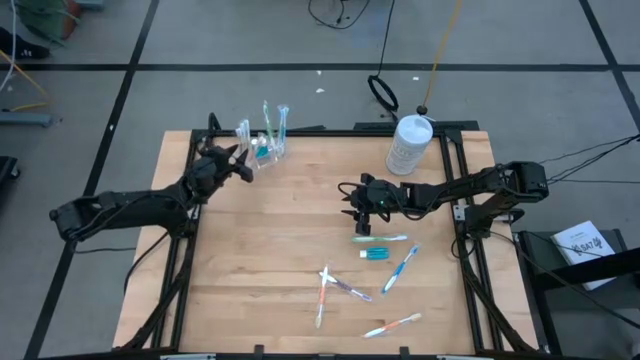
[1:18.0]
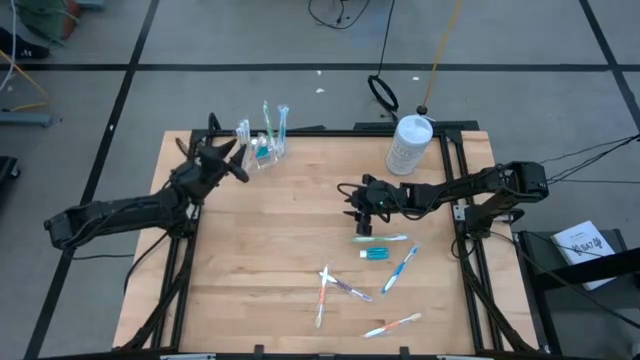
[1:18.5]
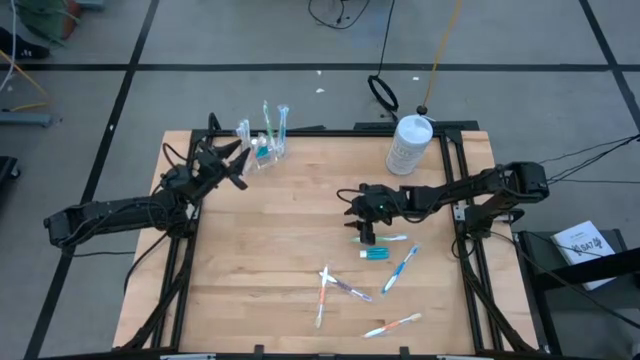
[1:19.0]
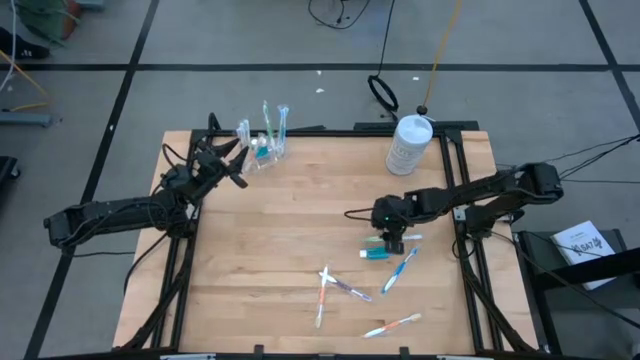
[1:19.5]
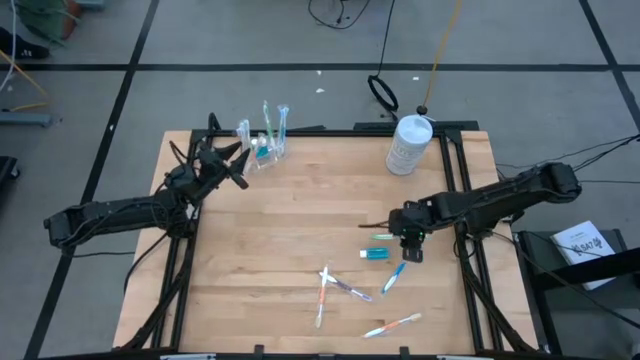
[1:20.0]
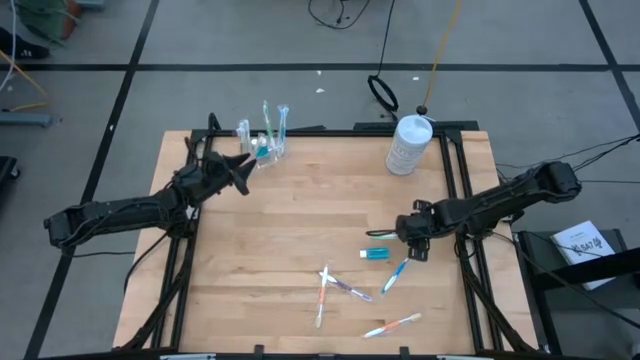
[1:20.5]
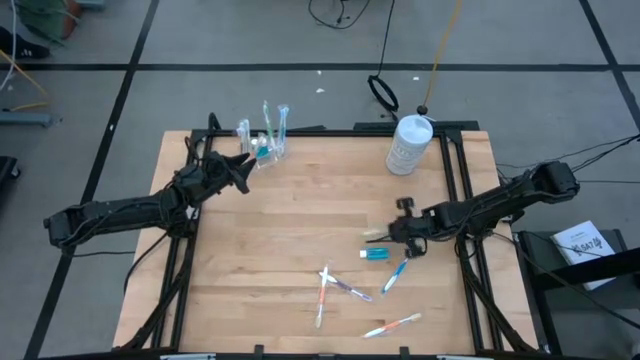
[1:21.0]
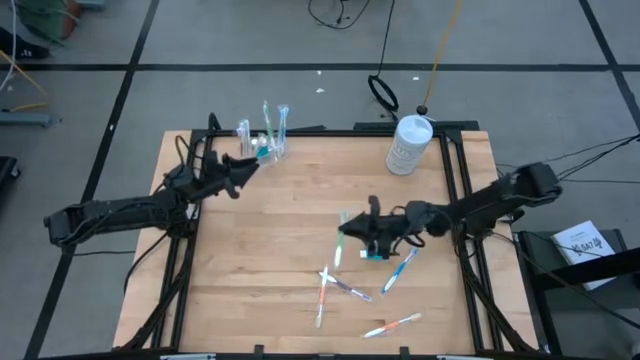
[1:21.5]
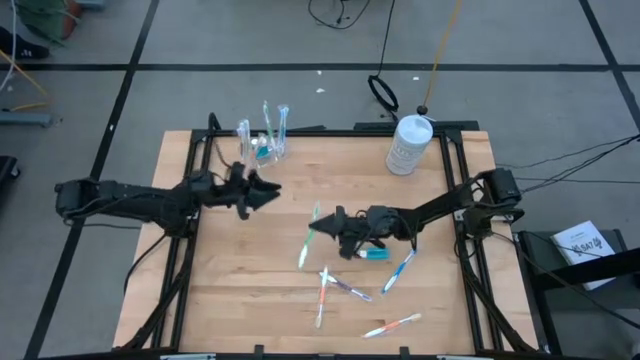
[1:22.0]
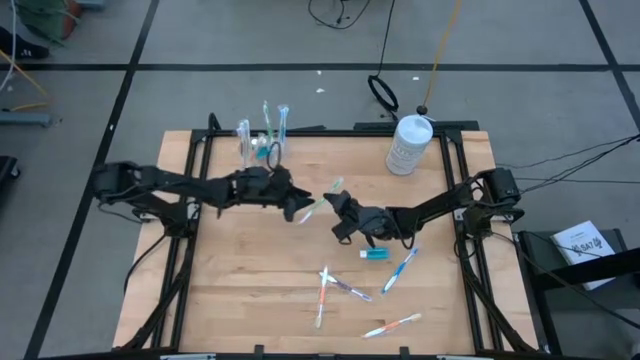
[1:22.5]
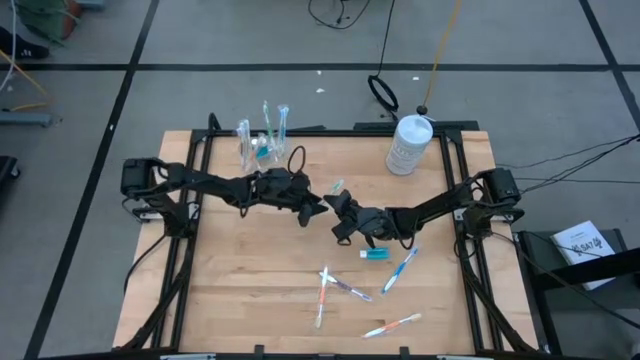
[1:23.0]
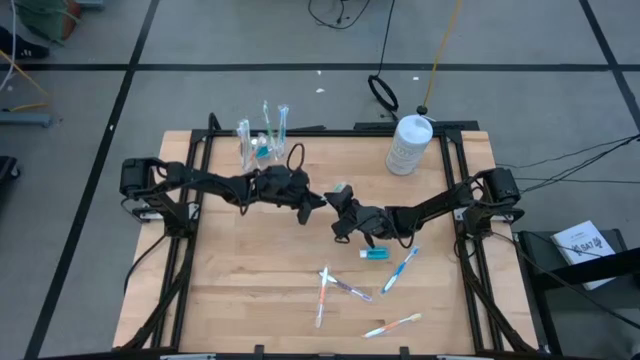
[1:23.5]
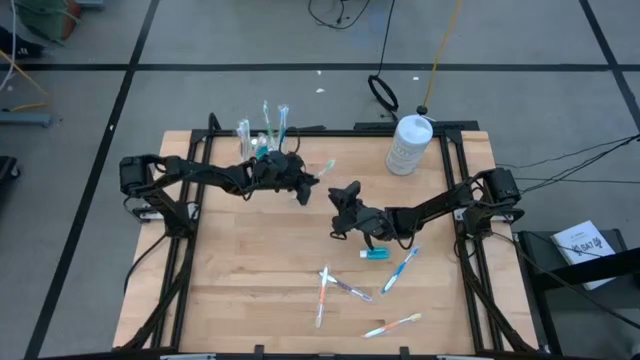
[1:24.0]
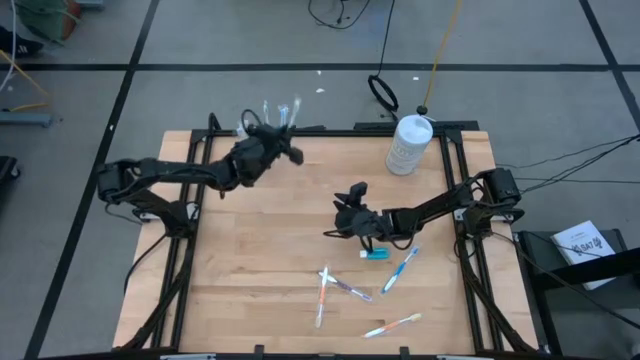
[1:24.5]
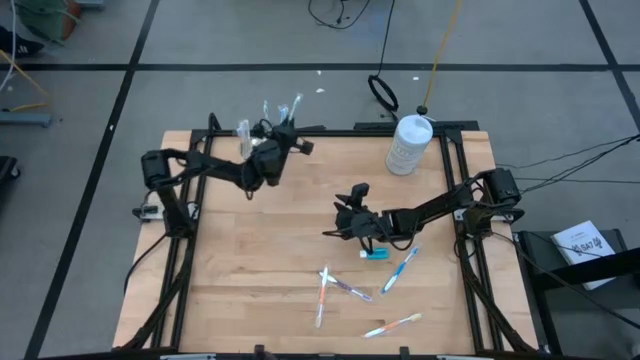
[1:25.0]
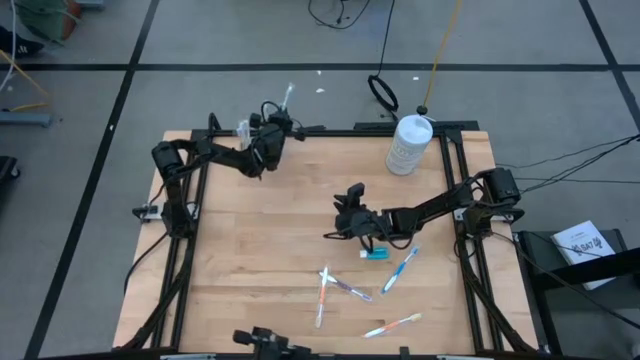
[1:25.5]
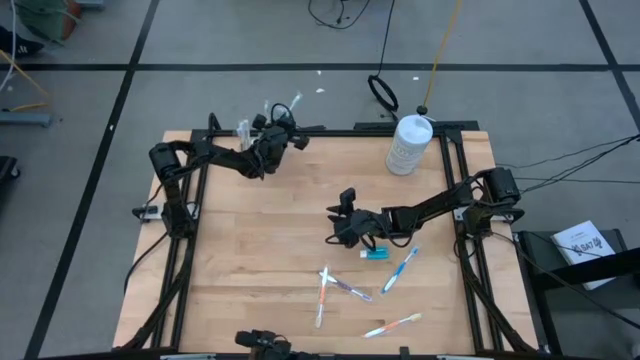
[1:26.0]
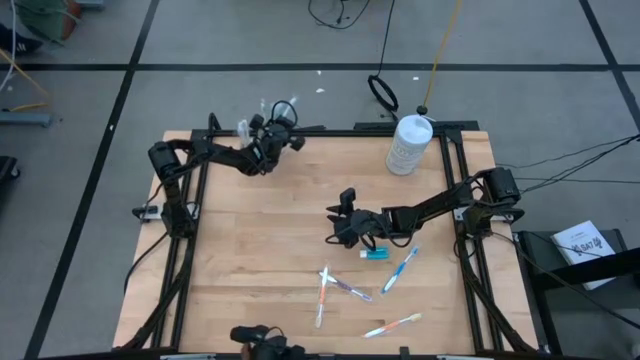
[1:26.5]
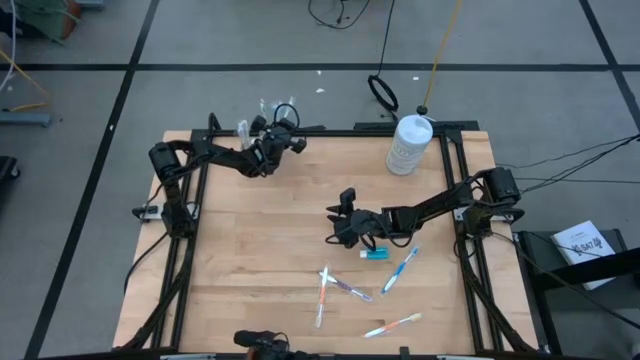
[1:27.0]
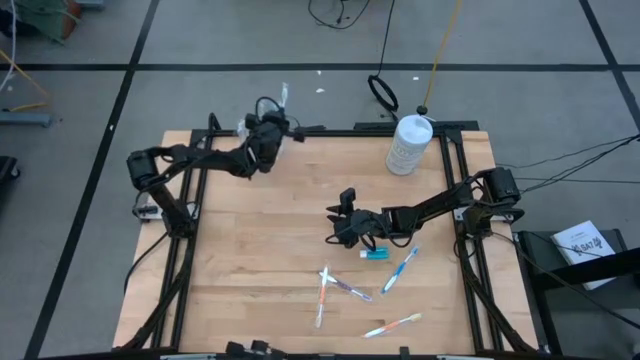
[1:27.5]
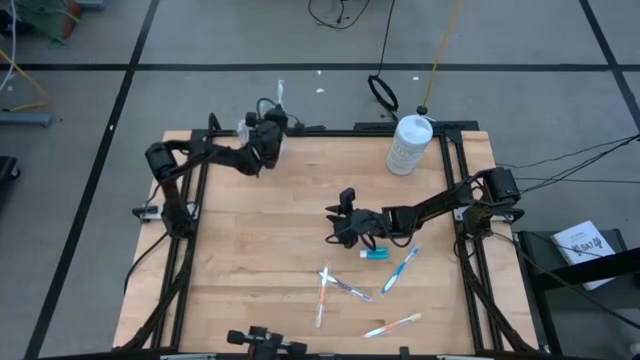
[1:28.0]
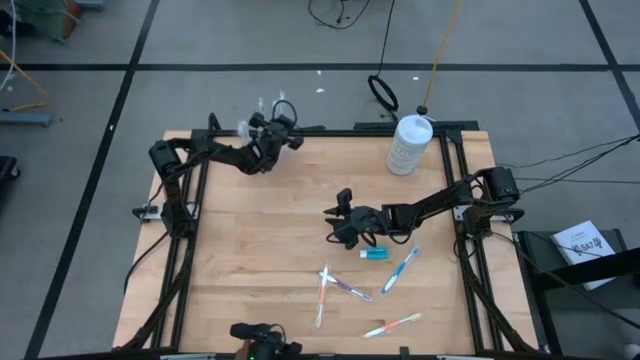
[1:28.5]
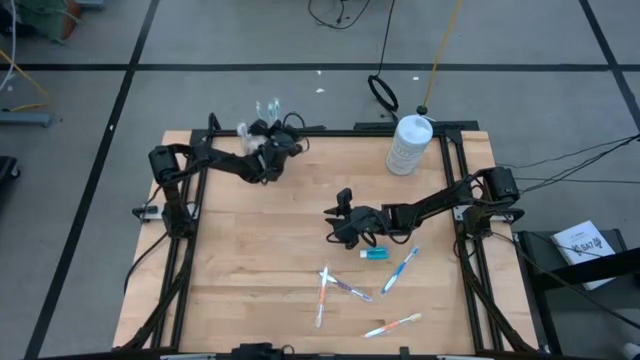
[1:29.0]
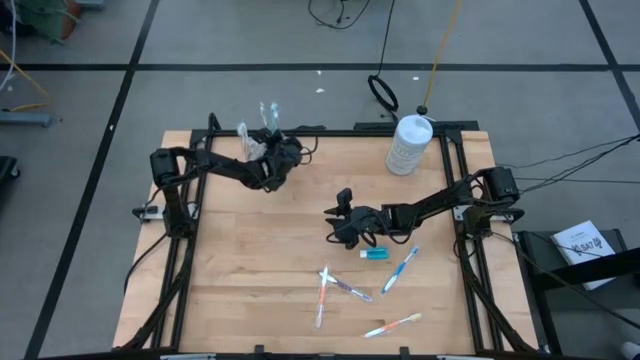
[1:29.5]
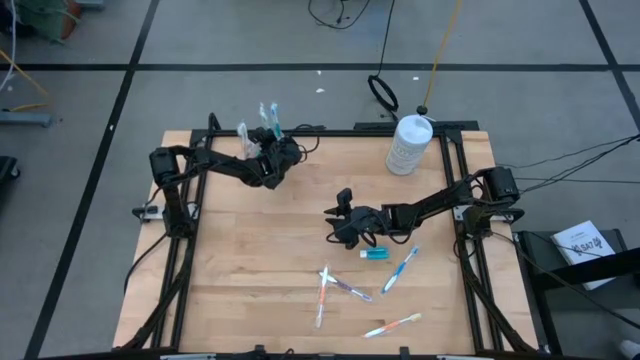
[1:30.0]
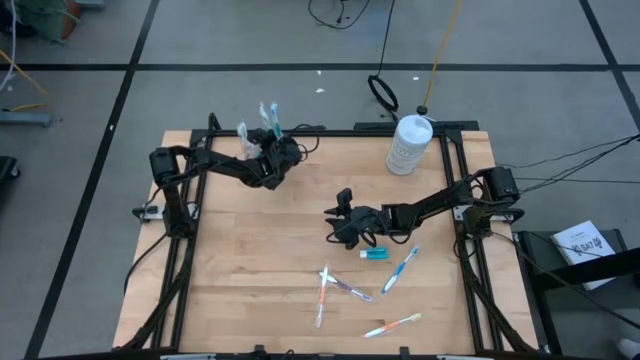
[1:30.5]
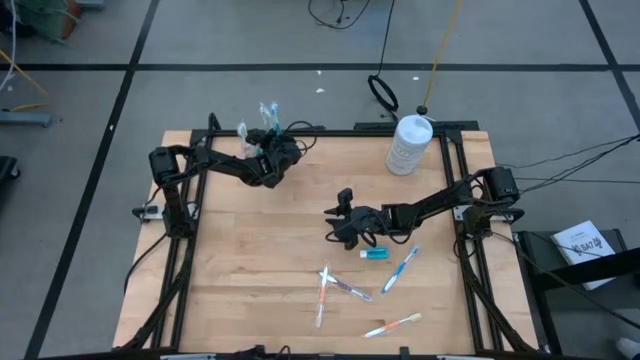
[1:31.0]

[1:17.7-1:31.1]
Task: Pick & Place toothbrushing station
Put the green toothbrush into the transparent organizer

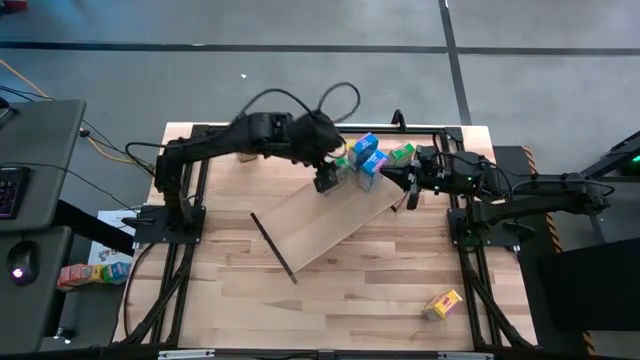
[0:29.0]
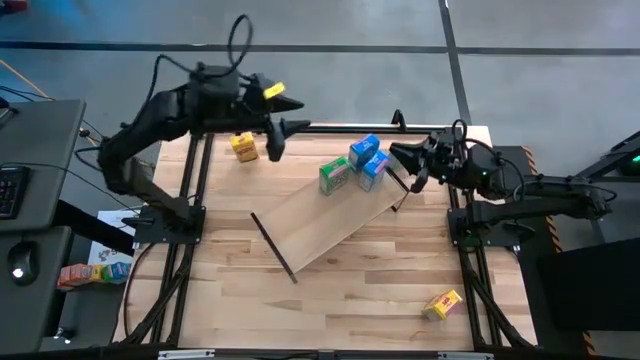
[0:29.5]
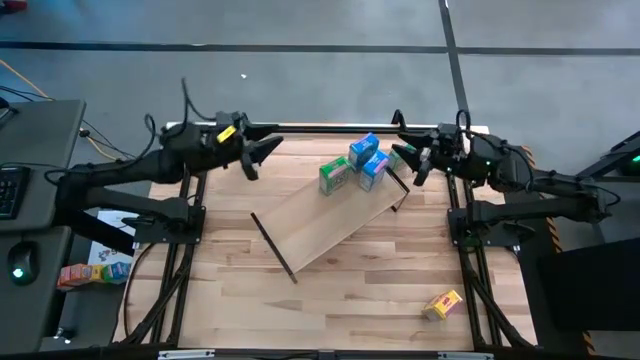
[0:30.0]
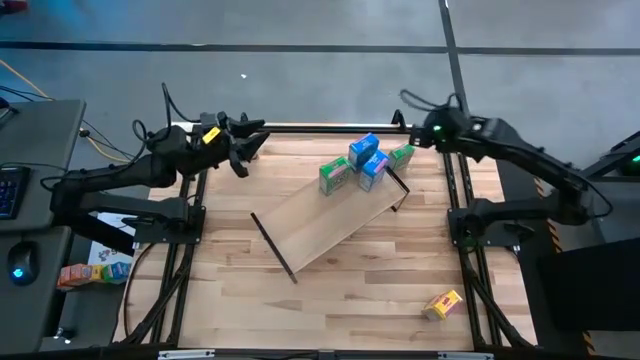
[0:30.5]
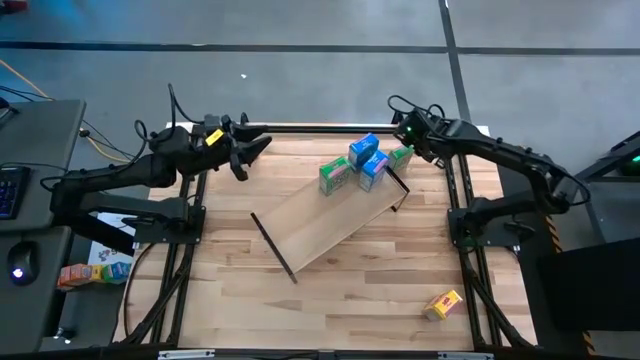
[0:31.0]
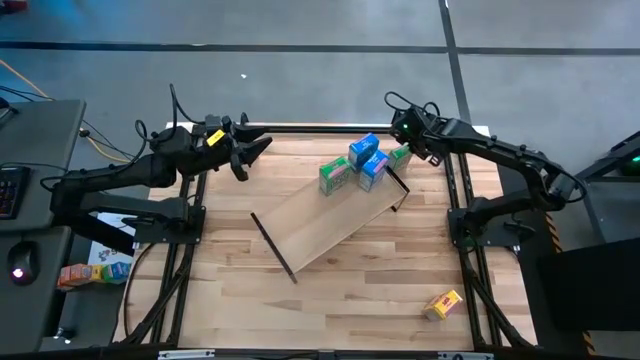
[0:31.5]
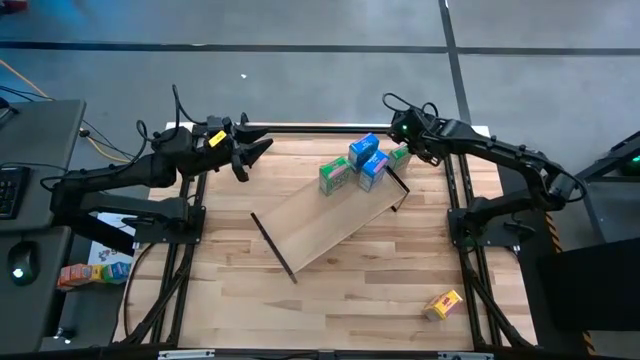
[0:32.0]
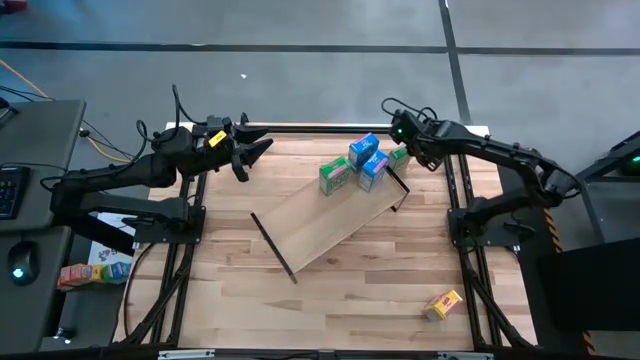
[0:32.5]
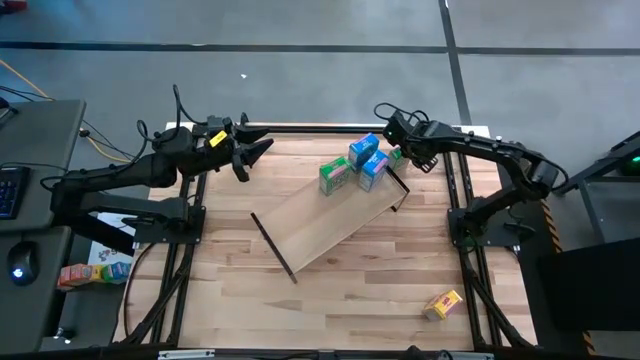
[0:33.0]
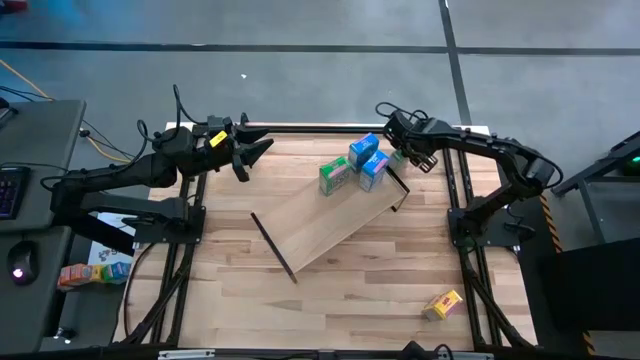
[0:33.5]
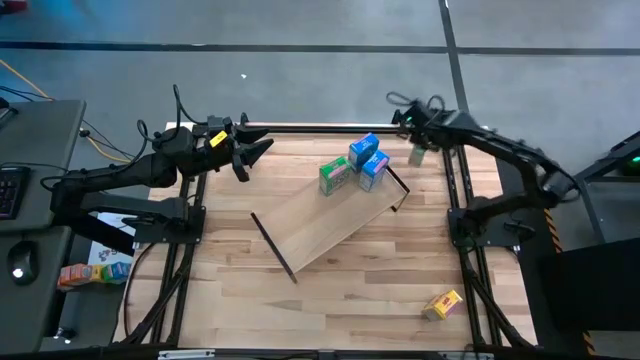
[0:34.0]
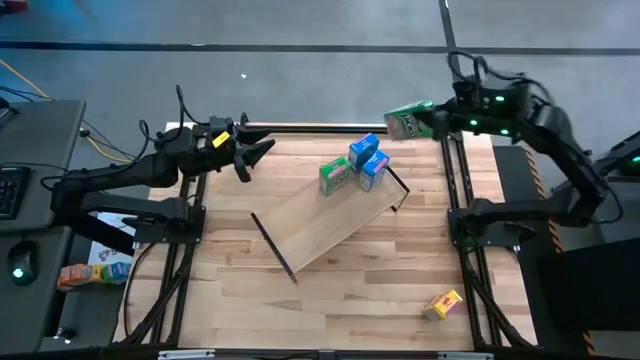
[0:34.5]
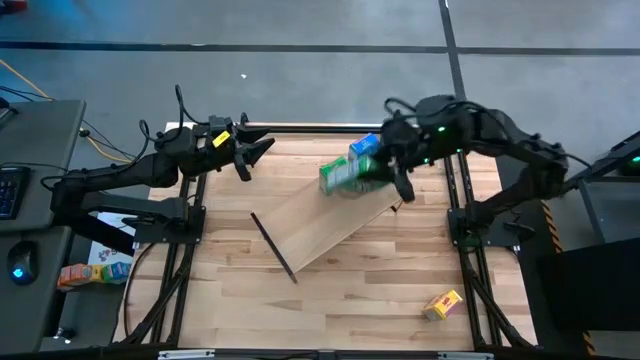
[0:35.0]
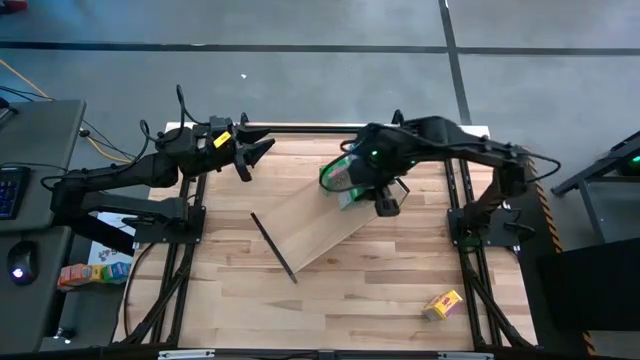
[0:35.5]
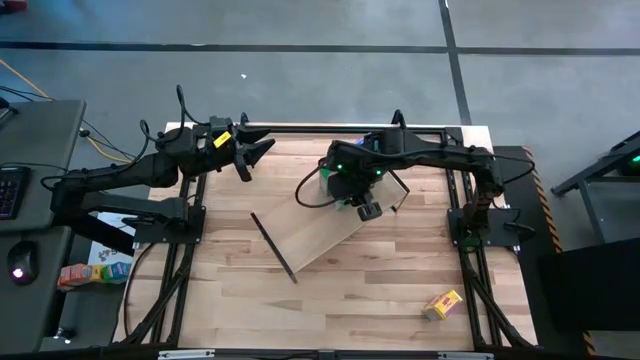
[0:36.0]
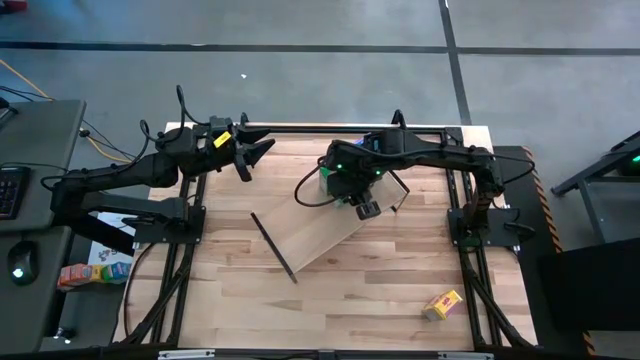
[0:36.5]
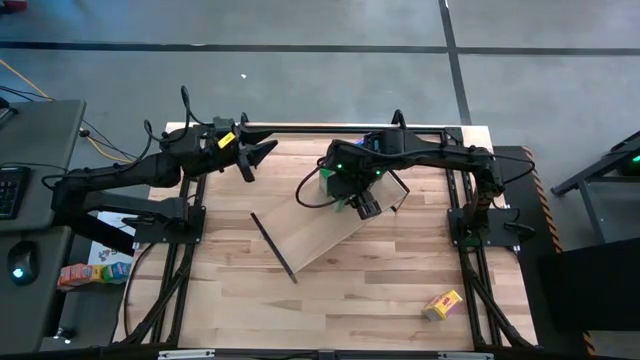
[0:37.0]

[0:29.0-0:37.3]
Task: Stack cereal on shelf
Put the green cereal box on the shelf aligned with the other green cereal box
